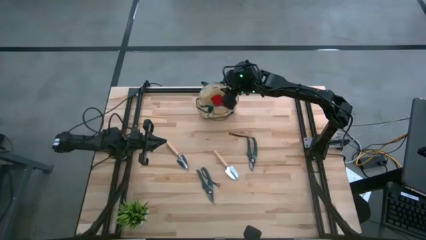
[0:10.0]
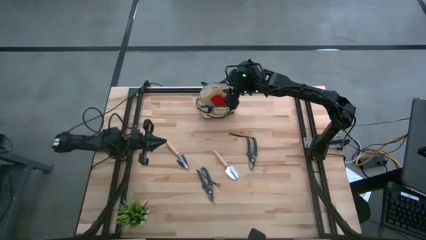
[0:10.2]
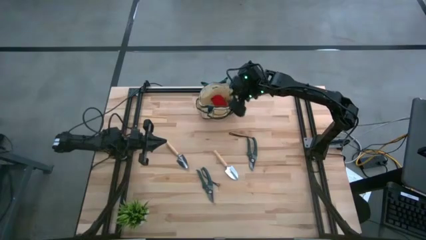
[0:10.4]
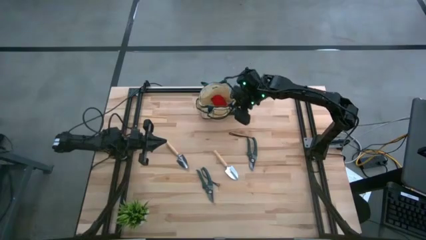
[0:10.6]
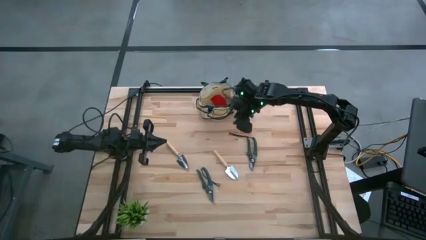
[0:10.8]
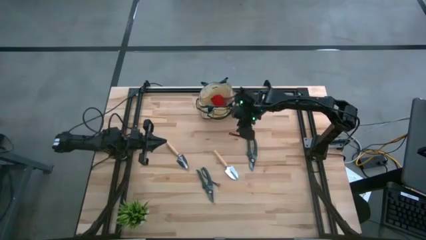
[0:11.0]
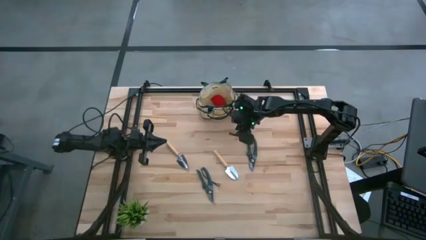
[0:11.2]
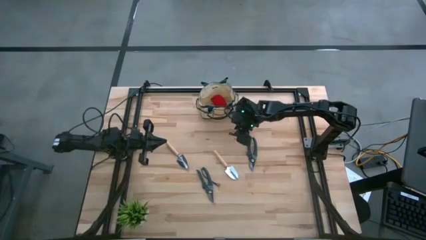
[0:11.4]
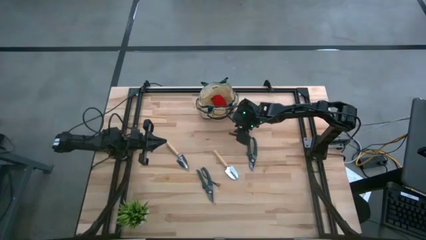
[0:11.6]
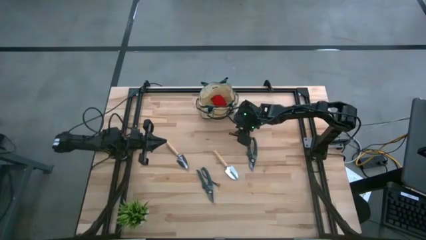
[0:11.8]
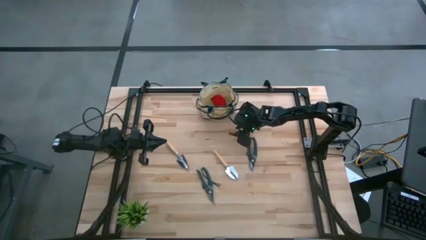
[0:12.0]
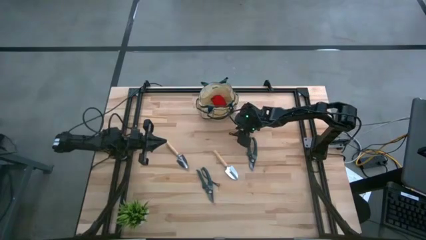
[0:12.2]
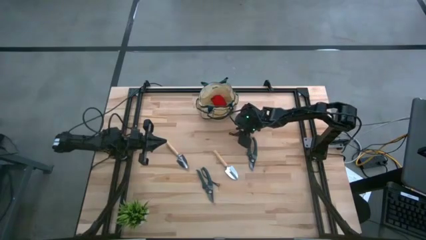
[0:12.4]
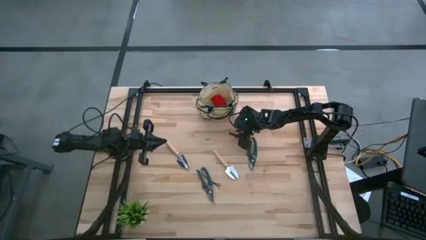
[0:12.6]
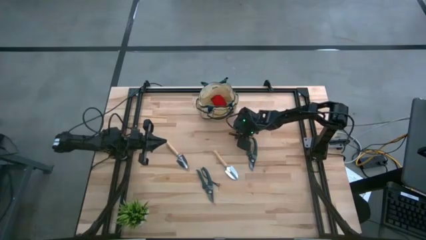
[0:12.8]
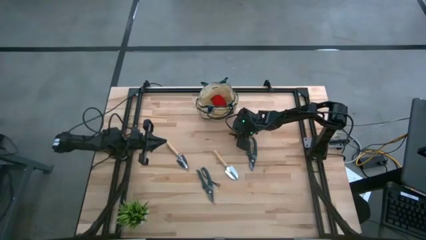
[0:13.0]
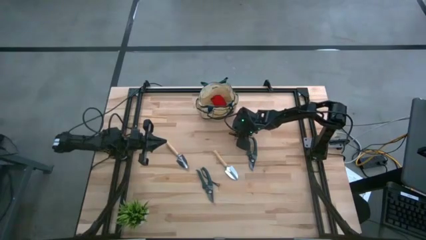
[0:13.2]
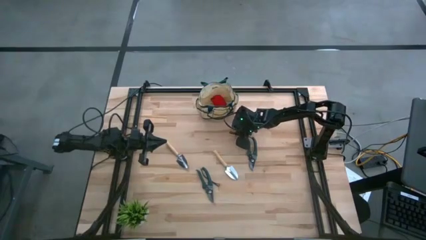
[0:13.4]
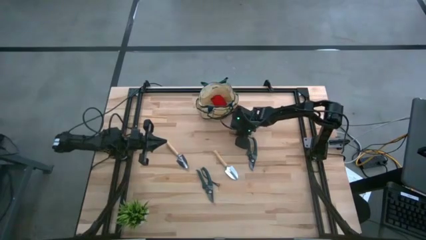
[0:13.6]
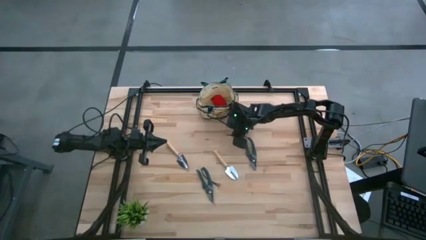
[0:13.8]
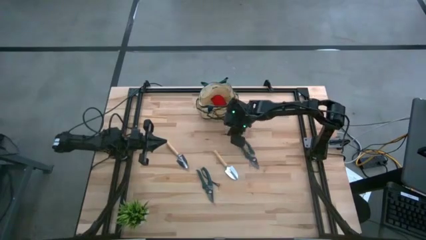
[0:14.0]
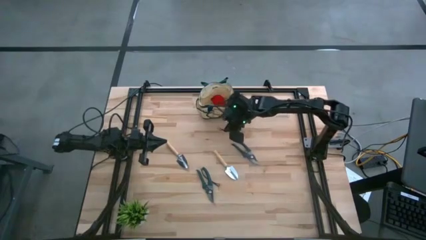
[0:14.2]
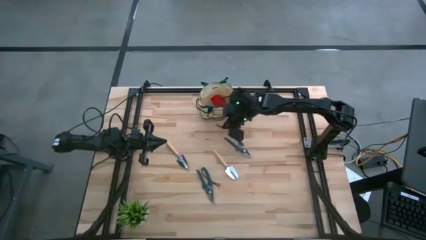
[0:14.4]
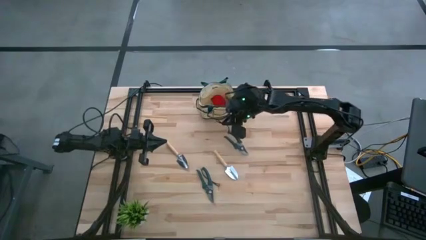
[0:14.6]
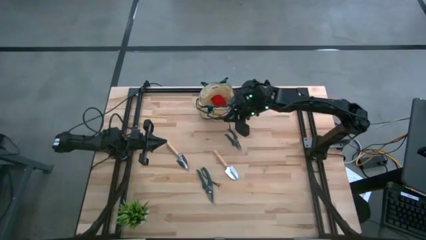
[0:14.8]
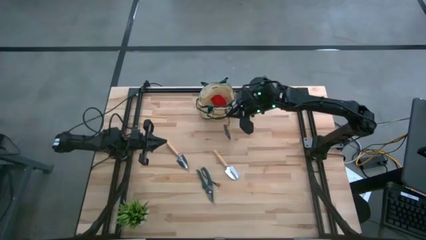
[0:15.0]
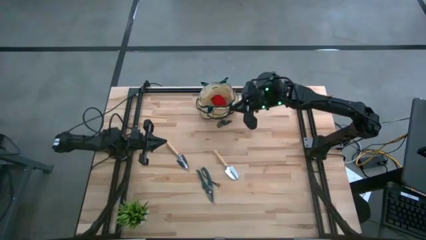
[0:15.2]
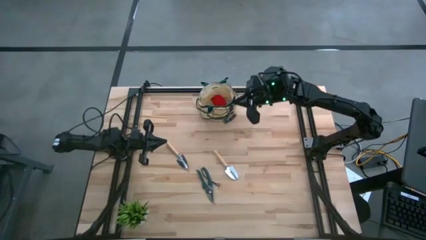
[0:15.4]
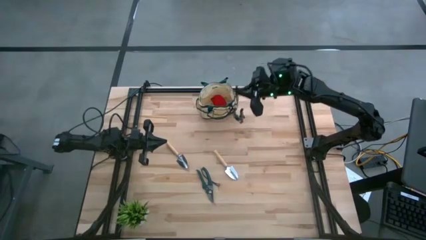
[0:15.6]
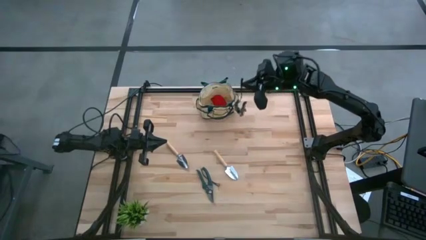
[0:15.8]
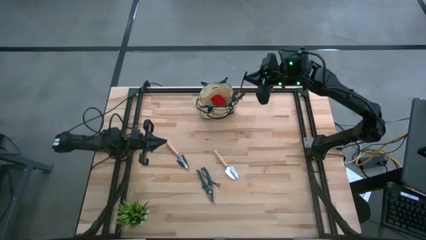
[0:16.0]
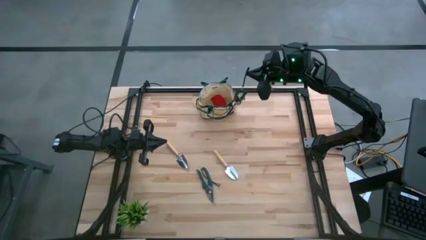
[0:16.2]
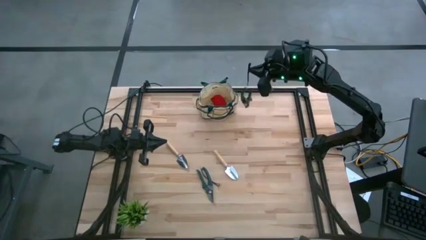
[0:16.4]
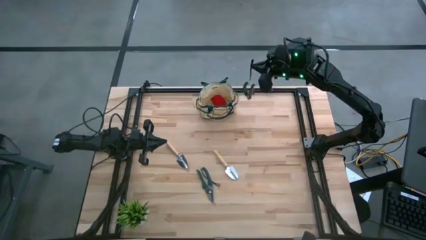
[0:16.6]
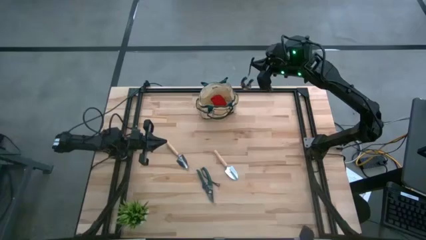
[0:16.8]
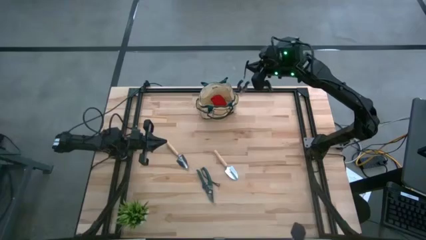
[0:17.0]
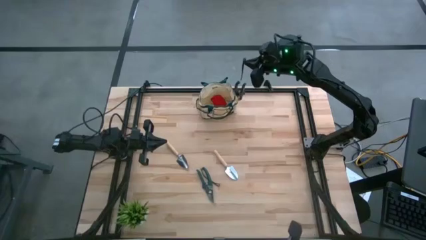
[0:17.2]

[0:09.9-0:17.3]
Task: Pick & Place Garden tools in Gardening bag
Put the top right shear scissors into the gardening bag

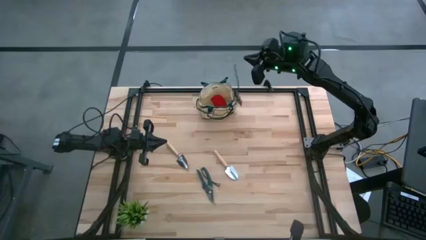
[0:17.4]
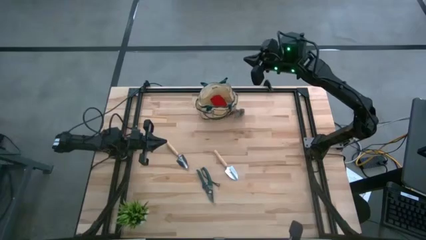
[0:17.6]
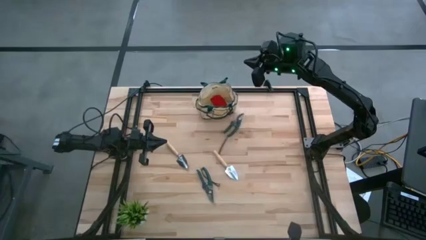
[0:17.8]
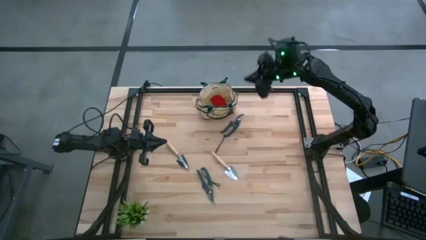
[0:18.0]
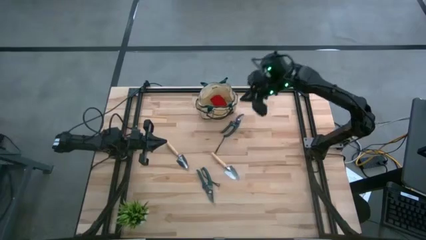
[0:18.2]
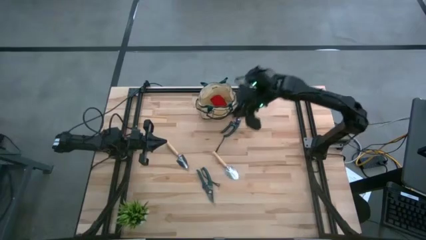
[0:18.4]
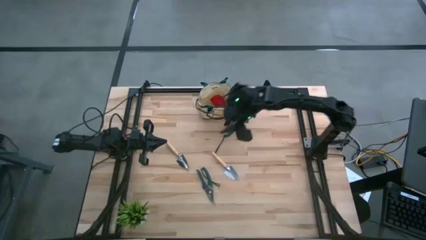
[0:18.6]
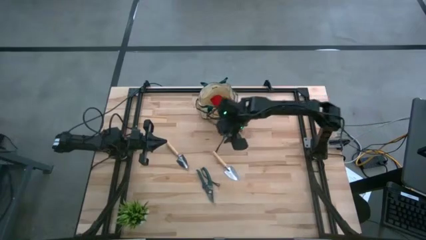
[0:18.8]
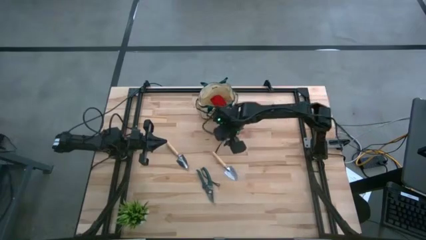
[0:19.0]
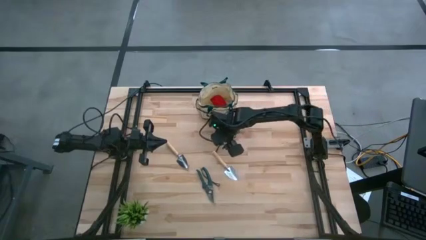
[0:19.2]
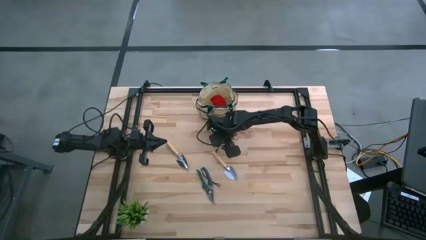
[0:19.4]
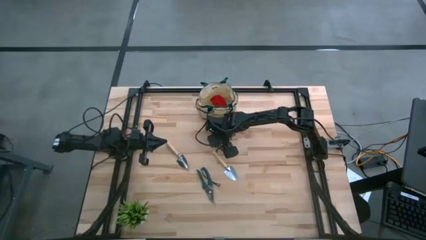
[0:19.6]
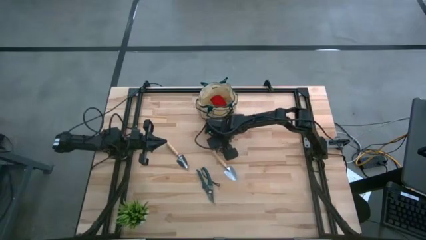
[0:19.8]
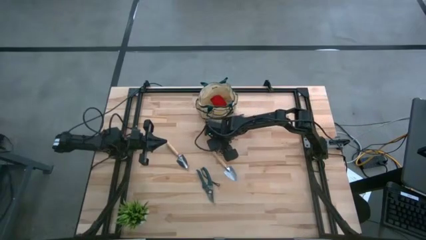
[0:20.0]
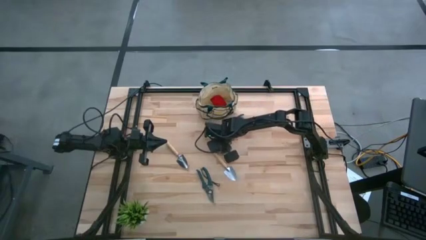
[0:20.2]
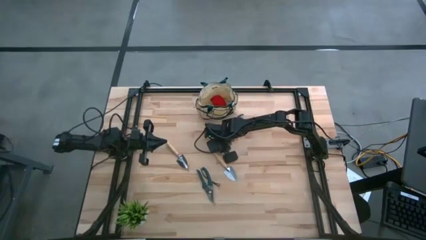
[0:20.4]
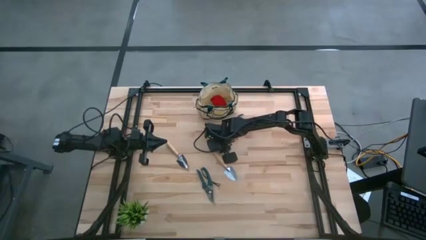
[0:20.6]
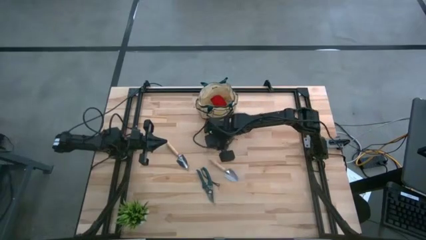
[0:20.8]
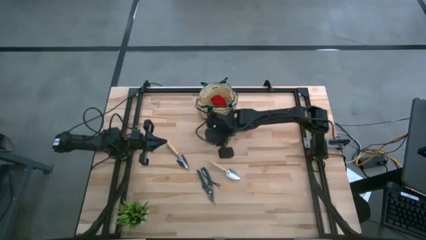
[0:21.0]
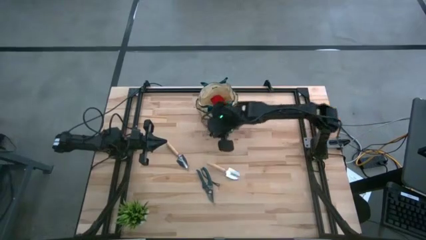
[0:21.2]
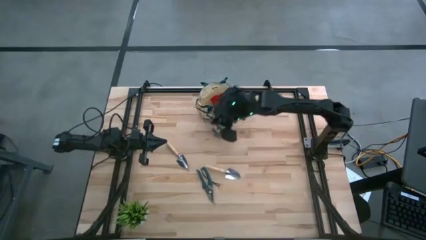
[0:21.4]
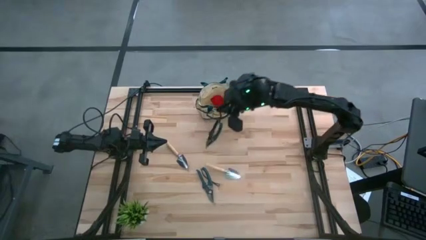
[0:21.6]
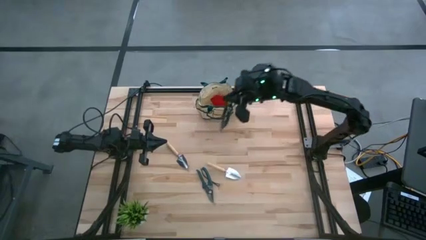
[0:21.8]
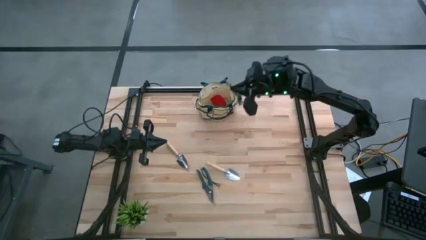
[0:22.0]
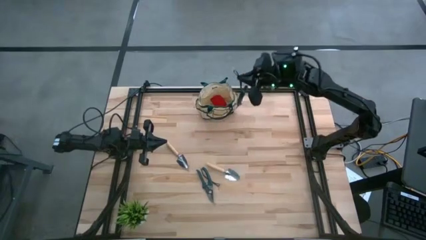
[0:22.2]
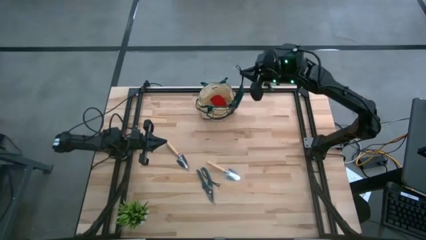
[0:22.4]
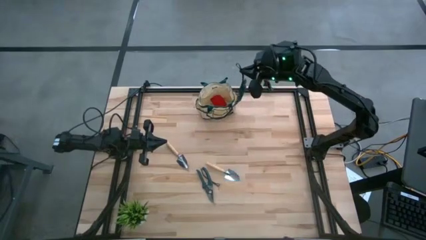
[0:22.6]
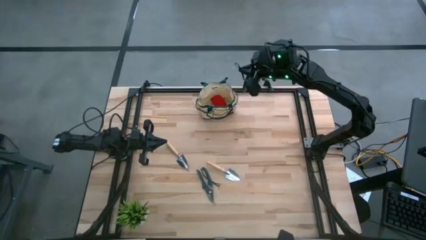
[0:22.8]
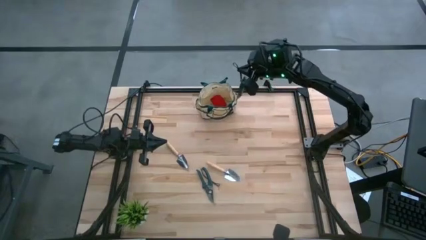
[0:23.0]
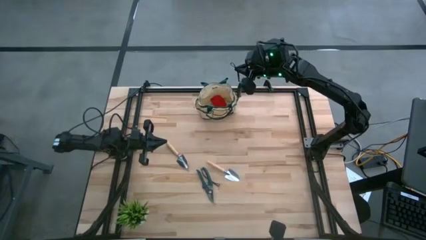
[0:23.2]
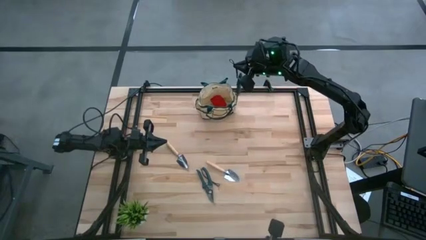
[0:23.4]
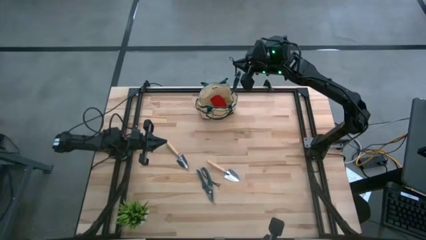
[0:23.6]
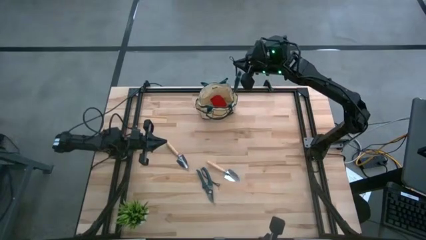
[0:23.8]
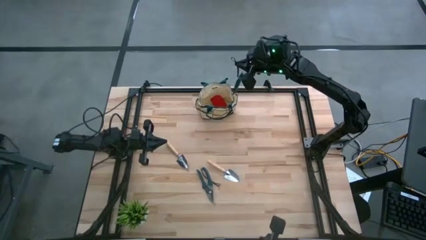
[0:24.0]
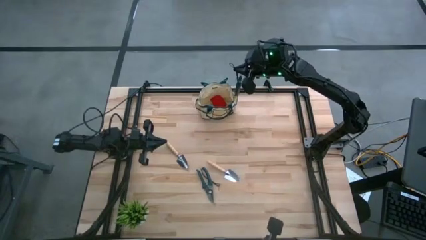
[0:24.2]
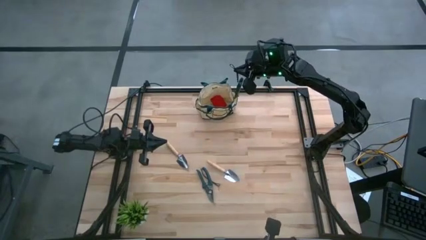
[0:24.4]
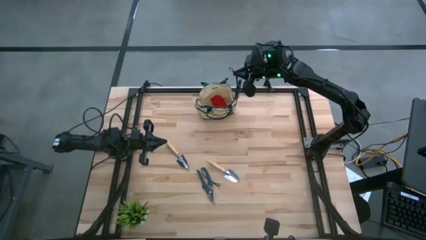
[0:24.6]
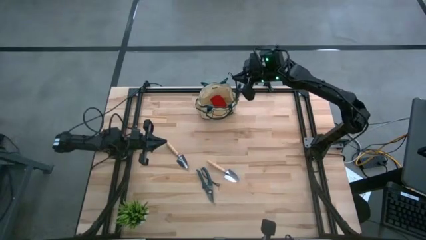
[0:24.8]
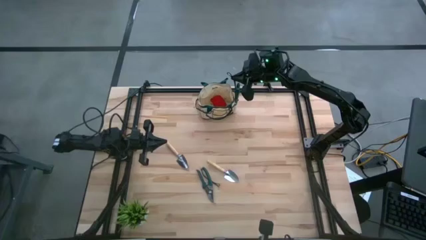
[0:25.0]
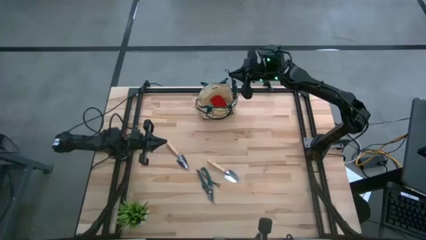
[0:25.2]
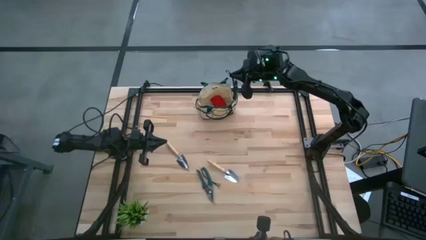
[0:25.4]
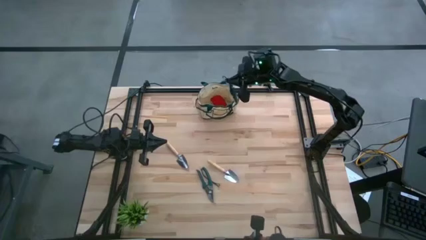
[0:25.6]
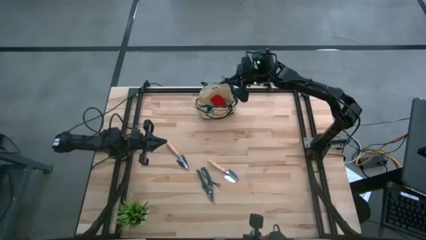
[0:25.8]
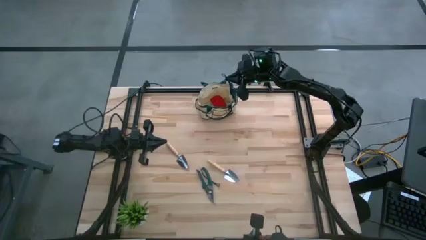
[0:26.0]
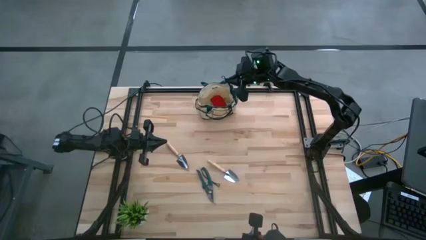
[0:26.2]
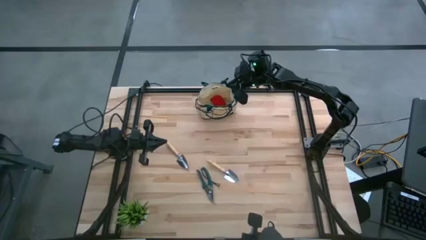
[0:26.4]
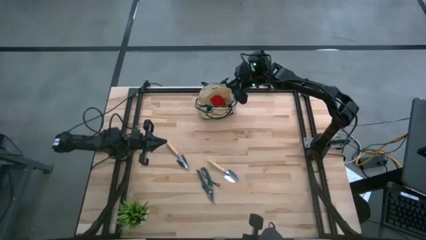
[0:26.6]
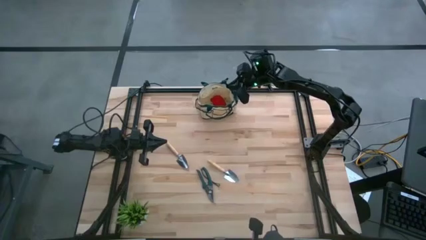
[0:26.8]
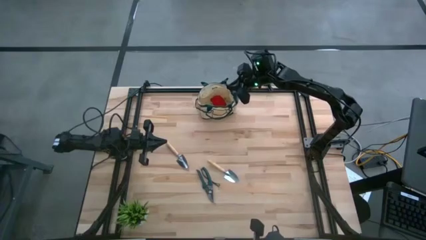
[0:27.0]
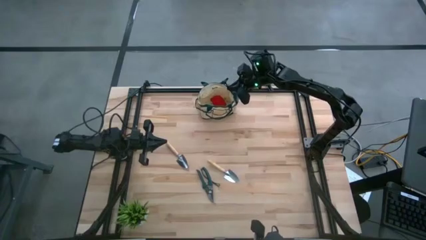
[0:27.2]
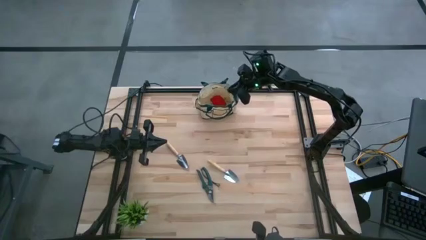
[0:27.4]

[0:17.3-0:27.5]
Put the top right shear scissors into the gardening bag
